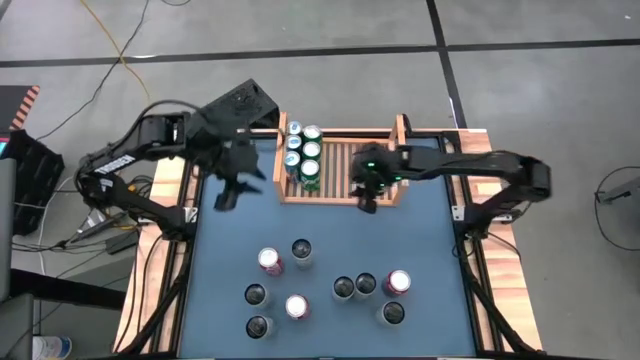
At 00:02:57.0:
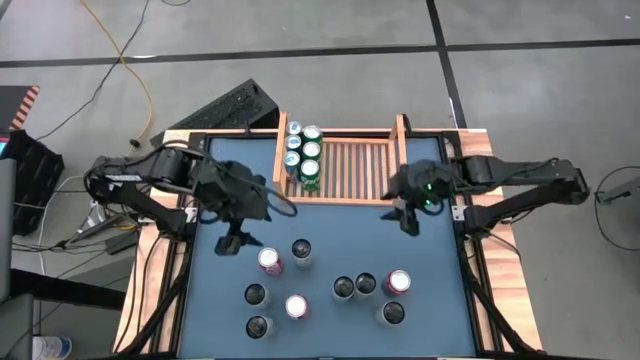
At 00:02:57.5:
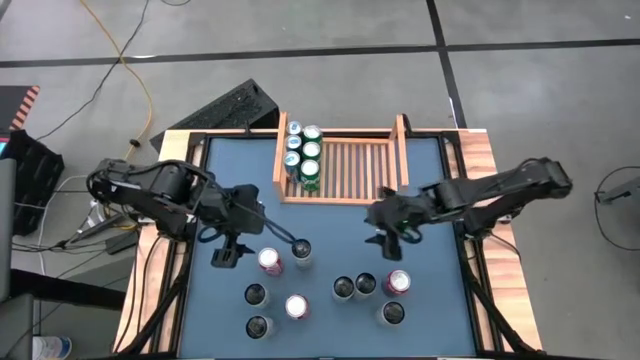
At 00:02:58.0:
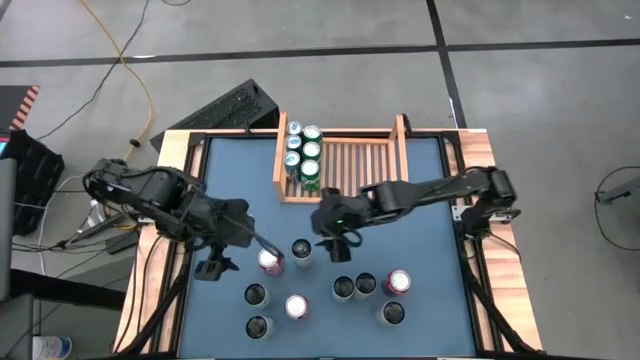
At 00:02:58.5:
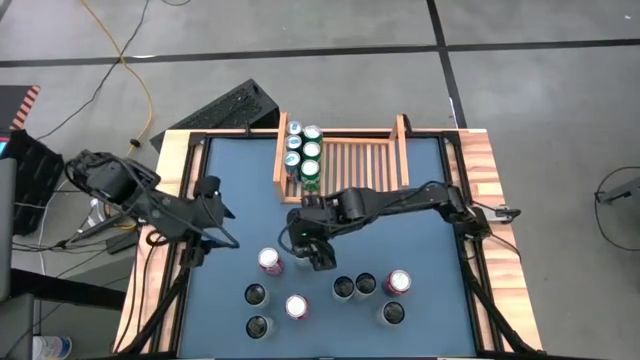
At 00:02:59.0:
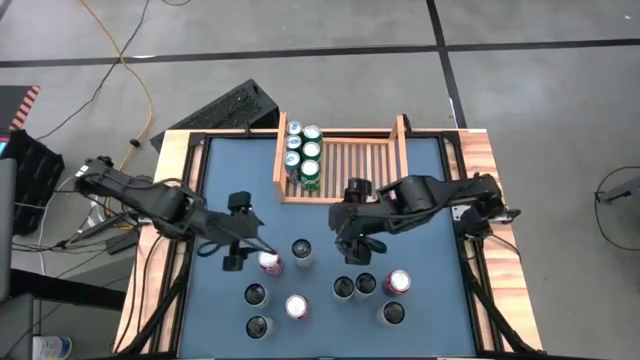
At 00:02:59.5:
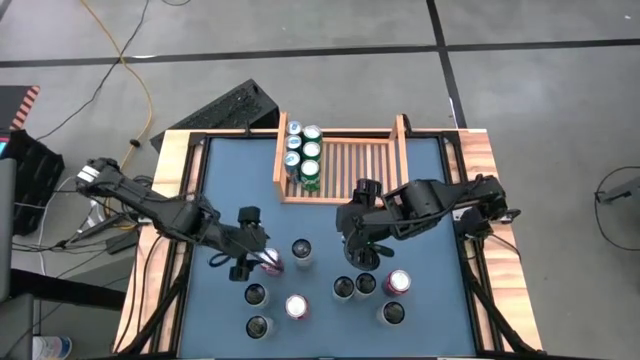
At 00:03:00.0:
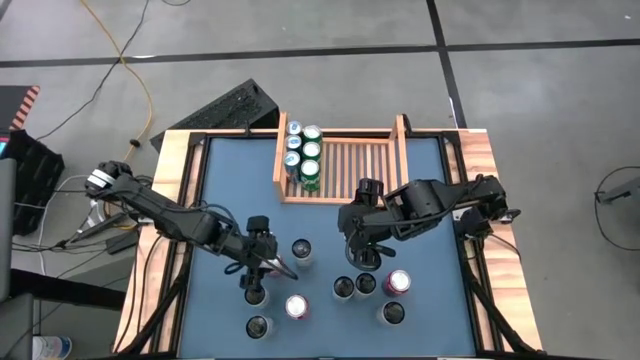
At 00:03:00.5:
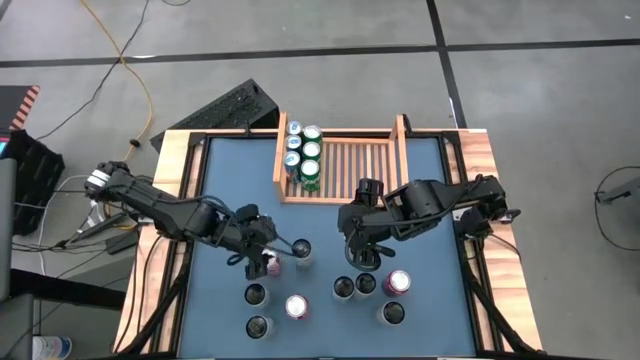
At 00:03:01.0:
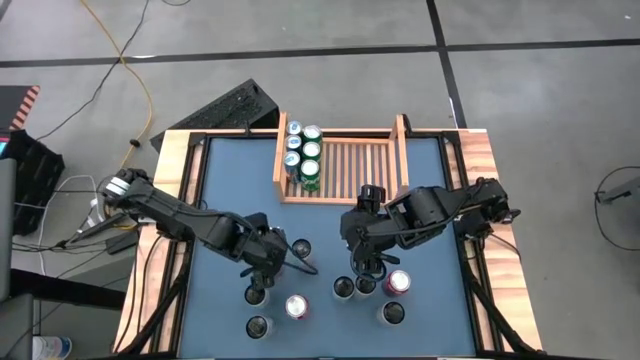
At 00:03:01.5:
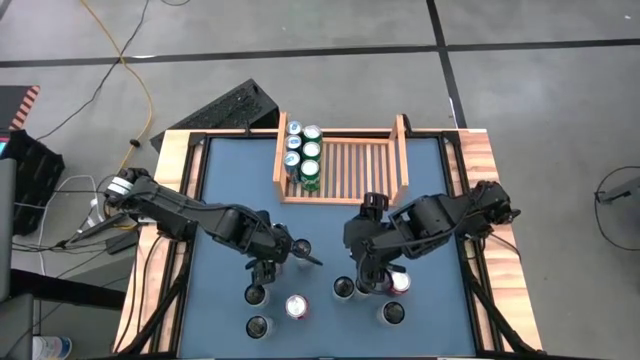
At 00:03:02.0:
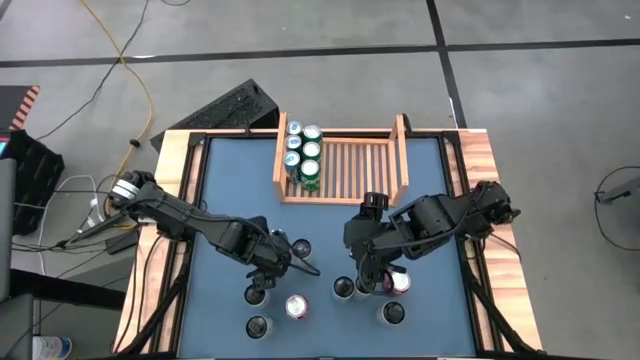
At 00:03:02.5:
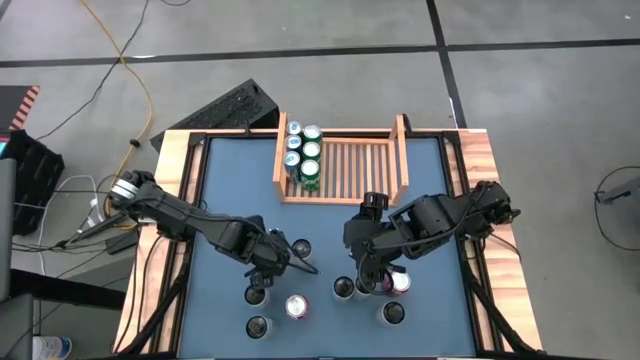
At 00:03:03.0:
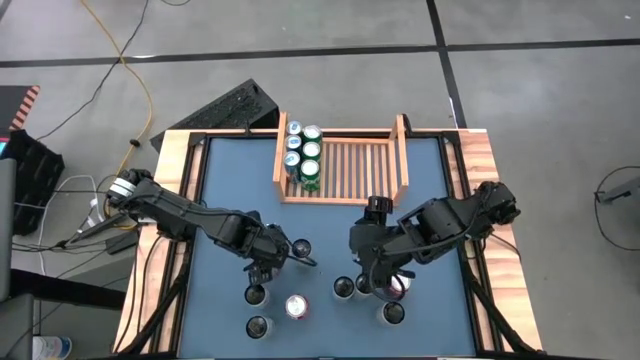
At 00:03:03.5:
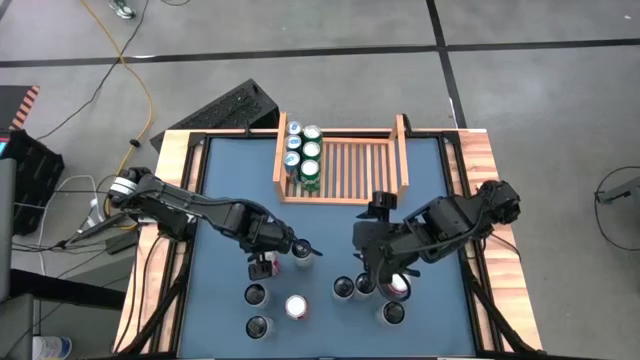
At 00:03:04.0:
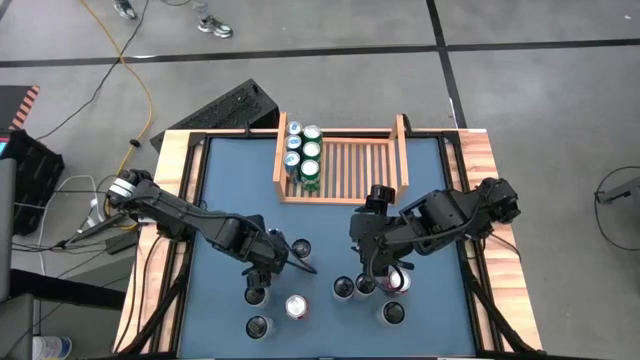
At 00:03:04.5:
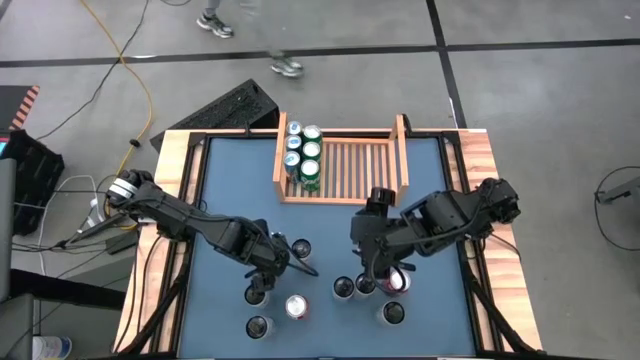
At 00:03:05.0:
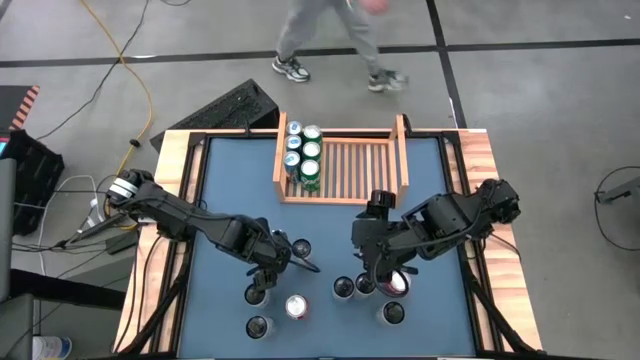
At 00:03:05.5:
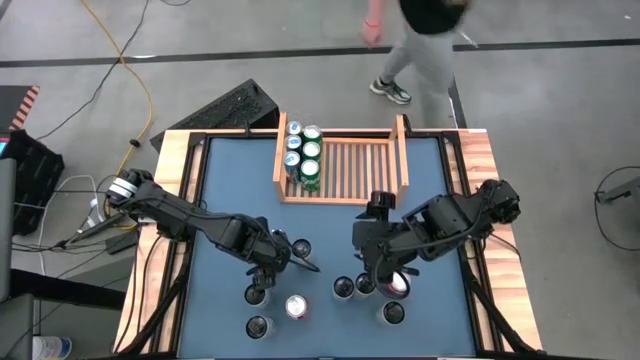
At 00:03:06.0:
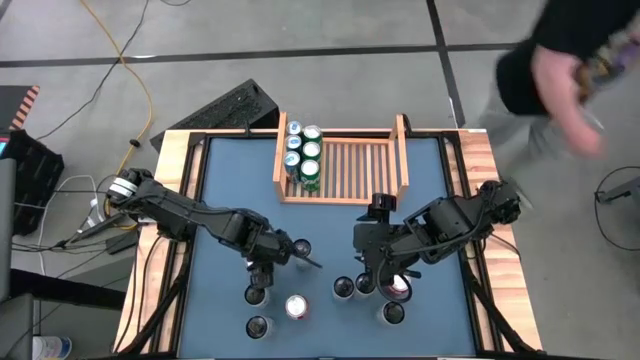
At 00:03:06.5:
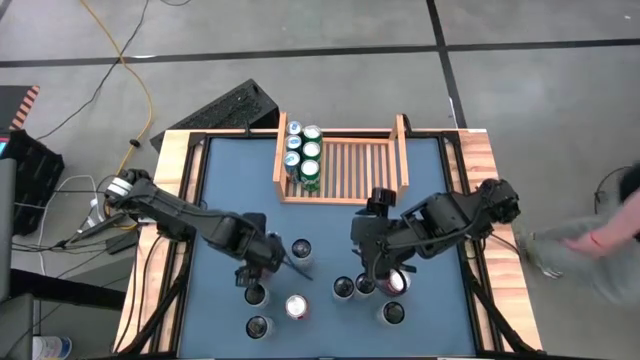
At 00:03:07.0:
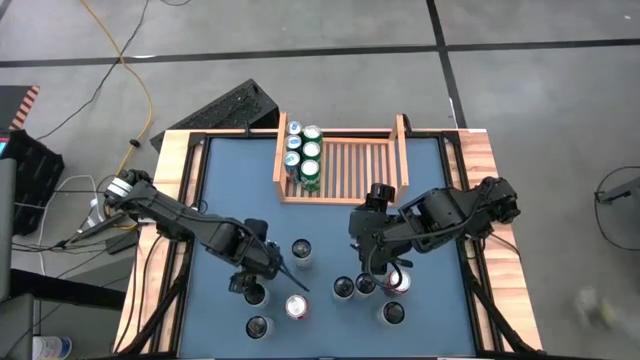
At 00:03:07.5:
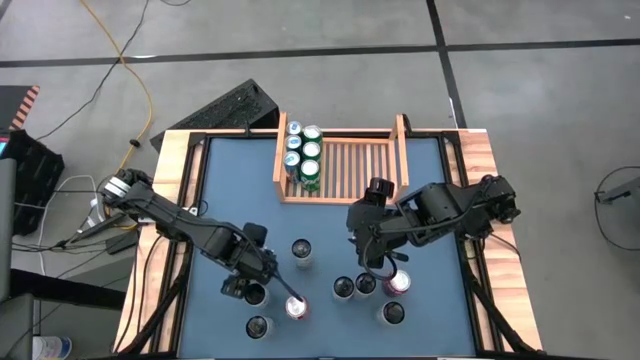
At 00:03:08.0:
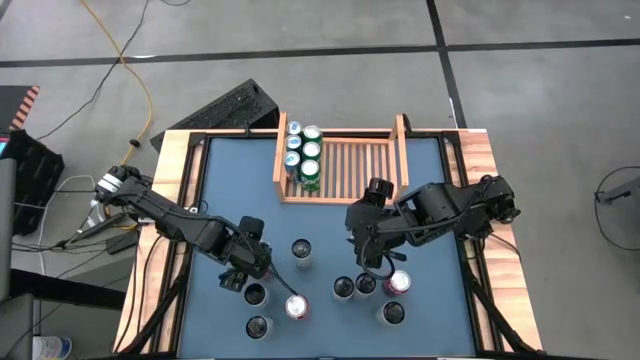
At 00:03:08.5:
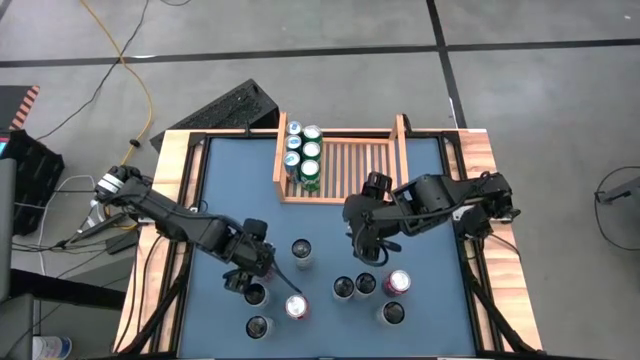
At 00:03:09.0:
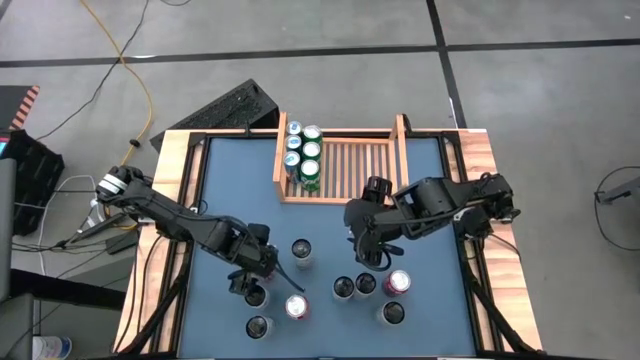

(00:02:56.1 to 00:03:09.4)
Task: Place canned beverage on shelf
Put the red soda can on the shelf

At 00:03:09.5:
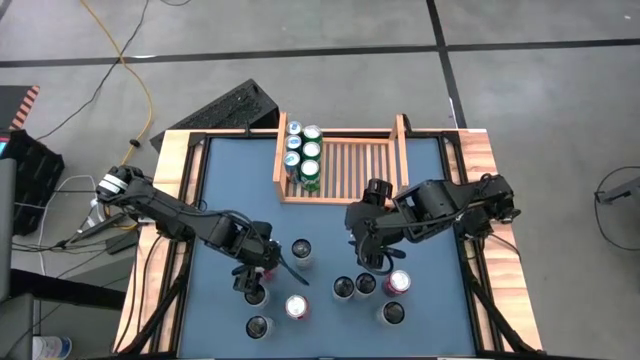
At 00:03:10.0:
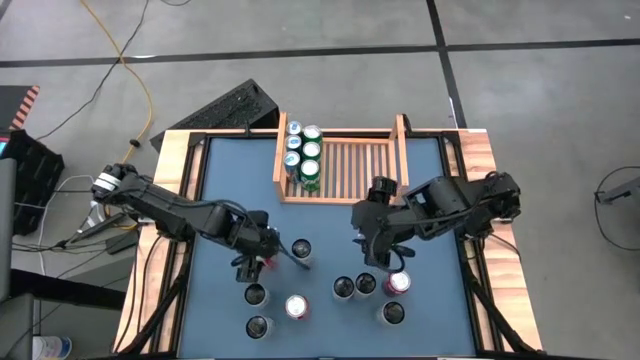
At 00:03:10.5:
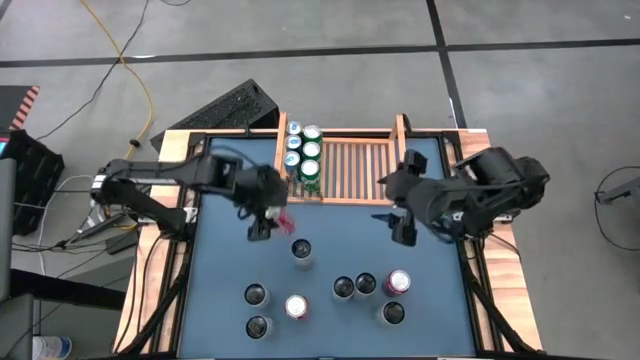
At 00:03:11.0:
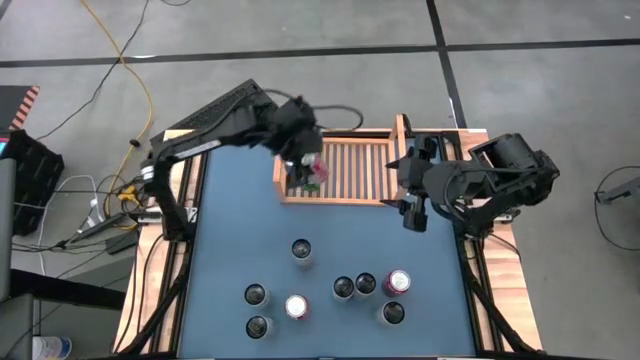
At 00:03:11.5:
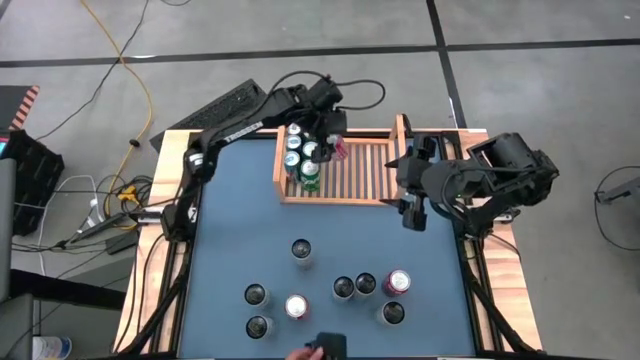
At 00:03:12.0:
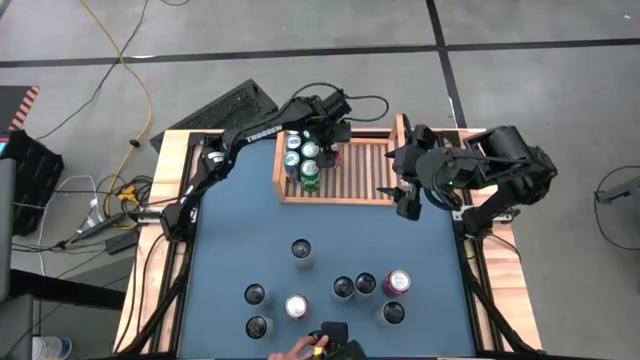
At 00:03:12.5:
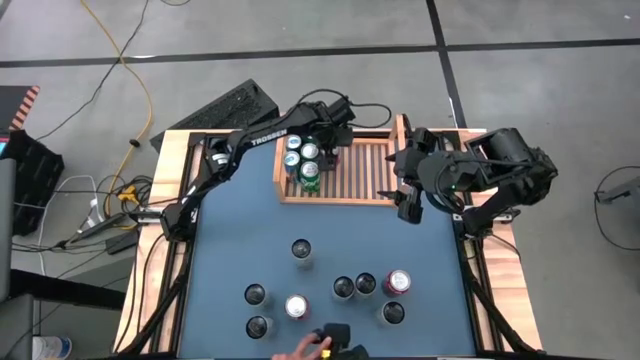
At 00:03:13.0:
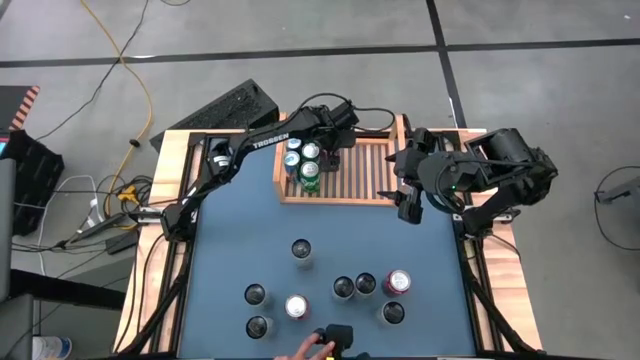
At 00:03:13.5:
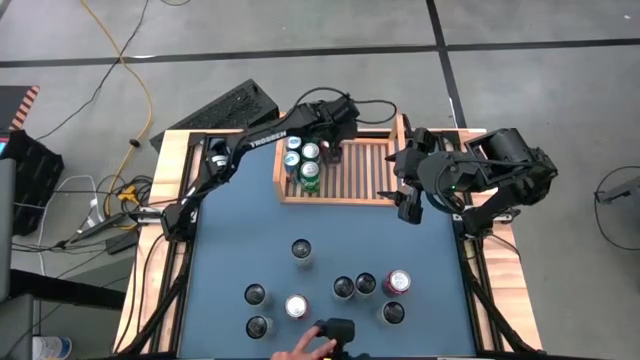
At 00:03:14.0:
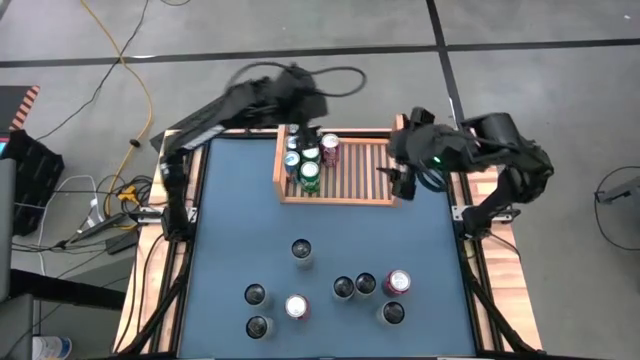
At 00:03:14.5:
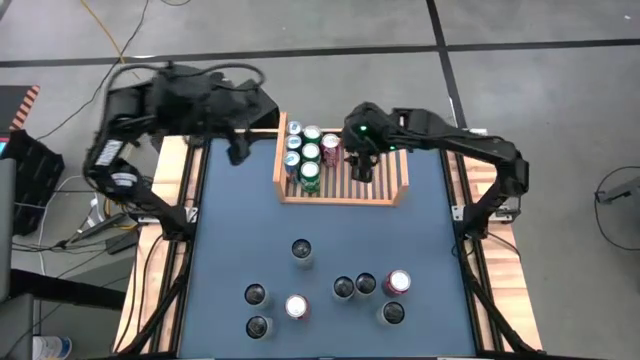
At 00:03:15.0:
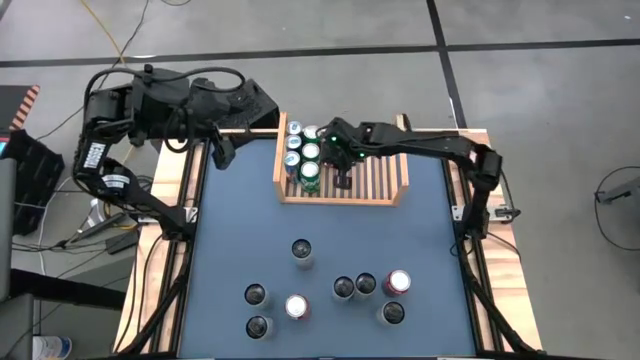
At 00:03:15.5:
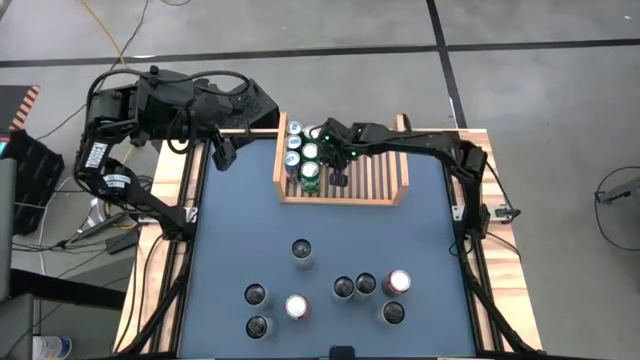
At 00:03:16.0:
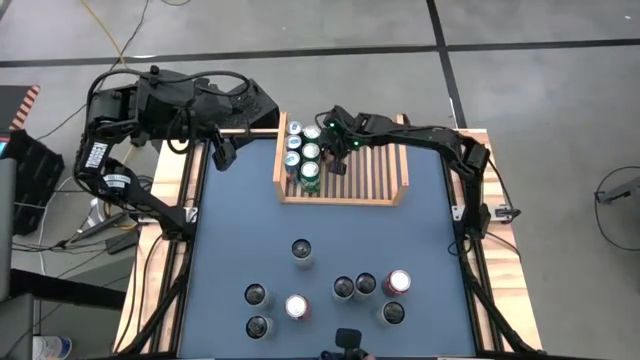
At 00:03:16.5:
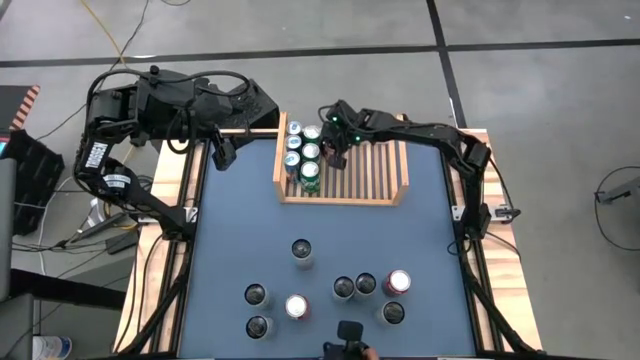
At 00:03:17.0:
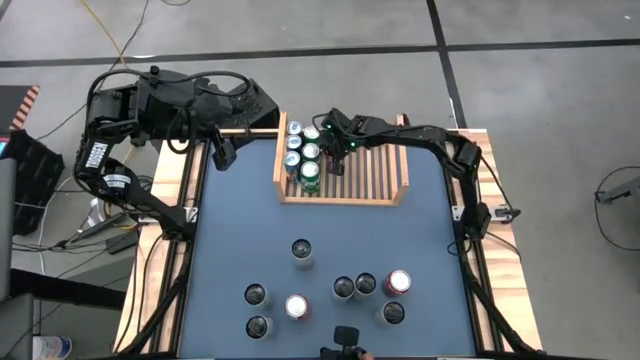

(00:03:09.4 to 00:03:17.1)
Put the red soda can on the shelf

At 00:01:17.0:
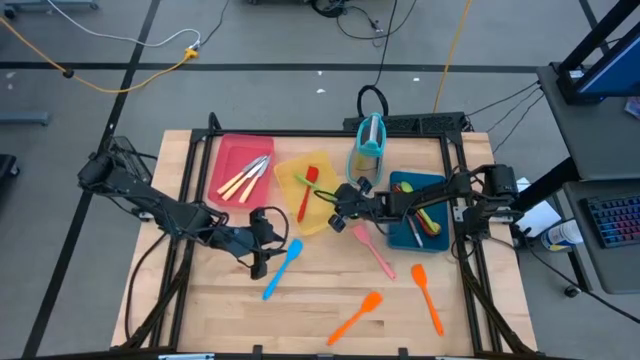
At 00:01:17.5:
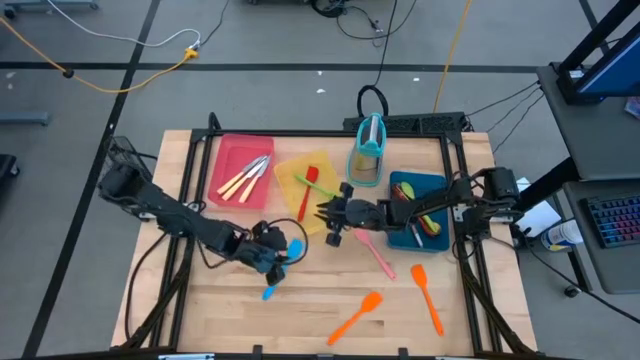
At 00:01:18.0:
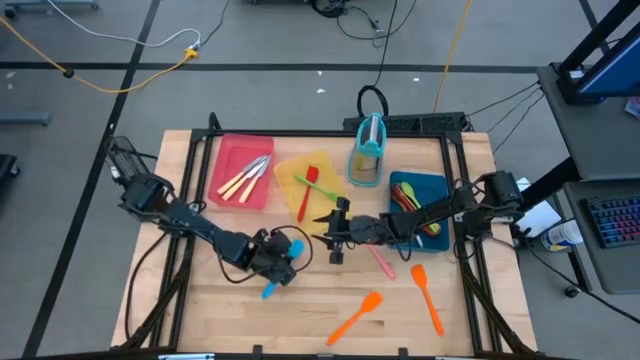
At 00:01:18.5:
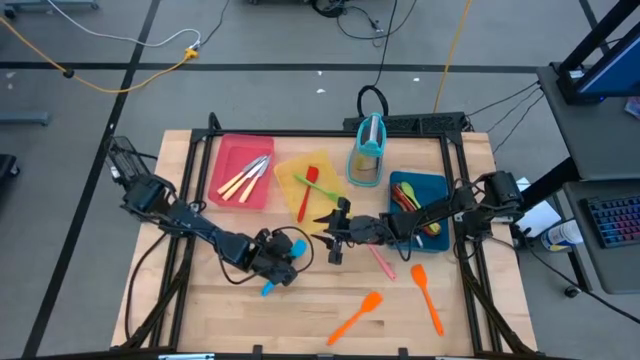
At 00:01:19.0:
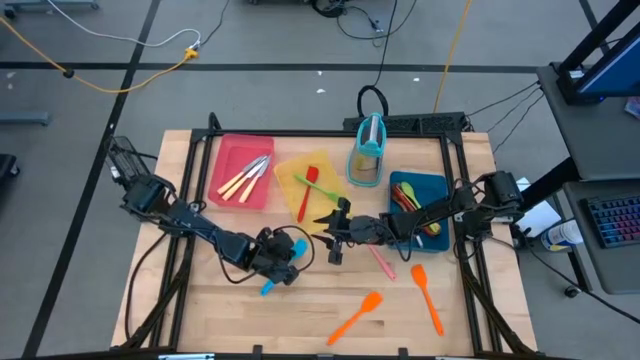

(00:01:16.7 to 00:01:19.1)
Task: Pick & Place Kitchen Items
Put the blue spatula into the yellow bin
